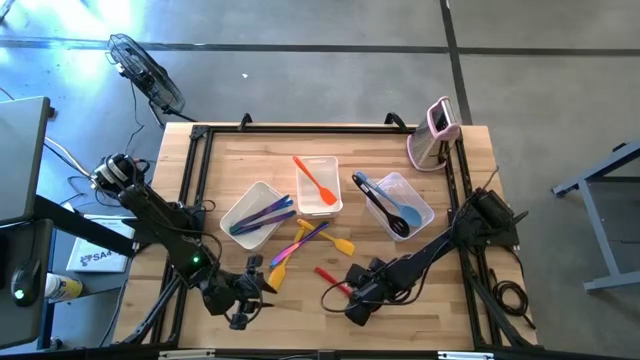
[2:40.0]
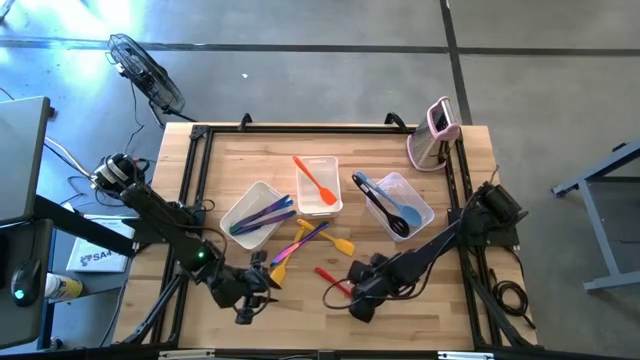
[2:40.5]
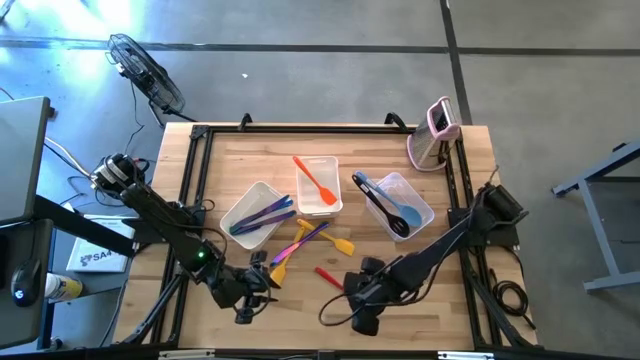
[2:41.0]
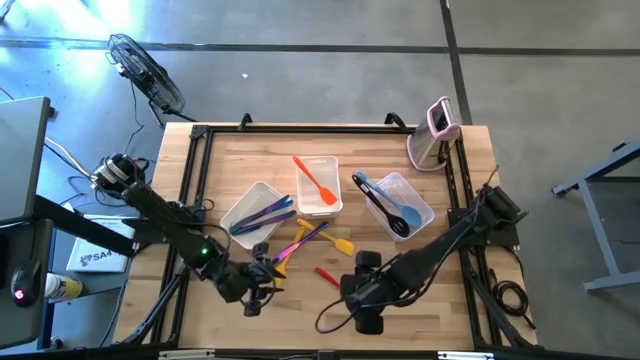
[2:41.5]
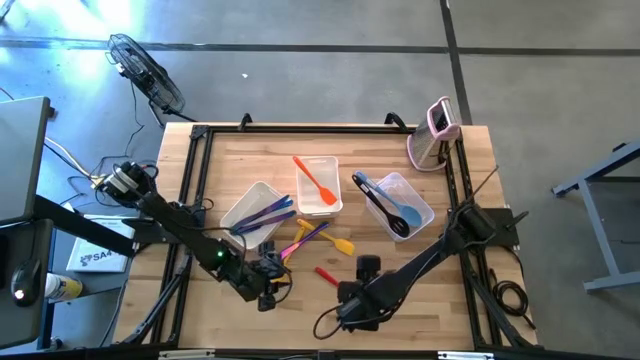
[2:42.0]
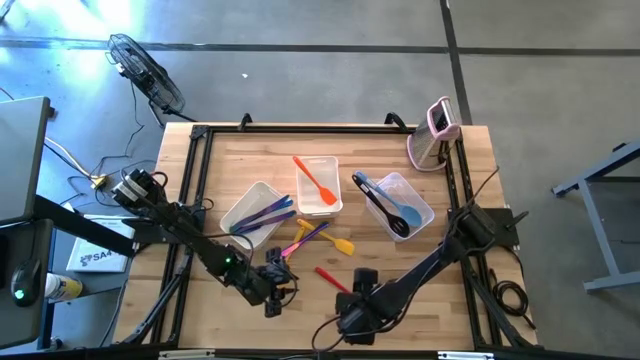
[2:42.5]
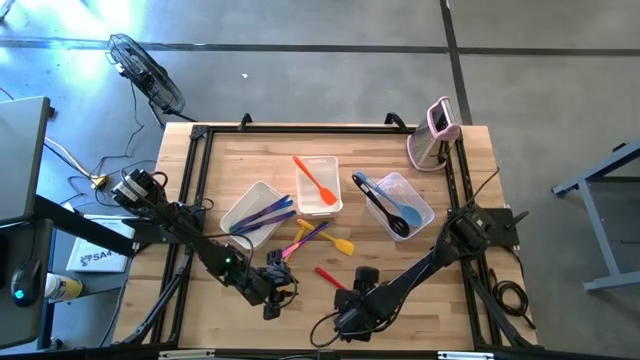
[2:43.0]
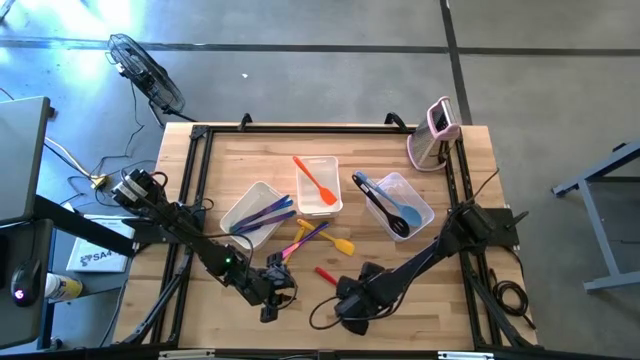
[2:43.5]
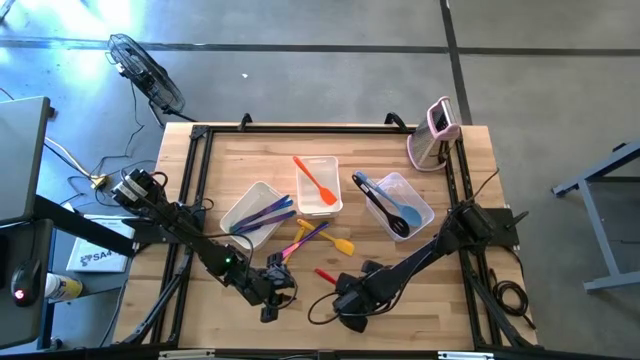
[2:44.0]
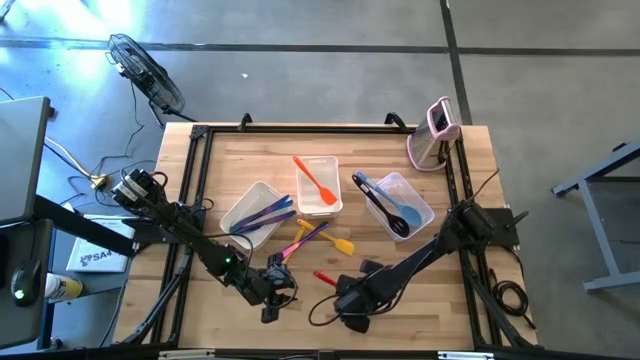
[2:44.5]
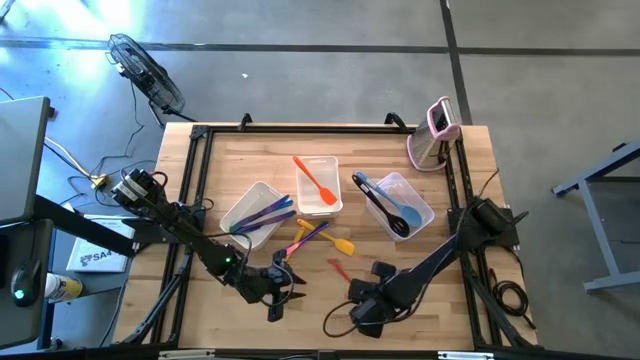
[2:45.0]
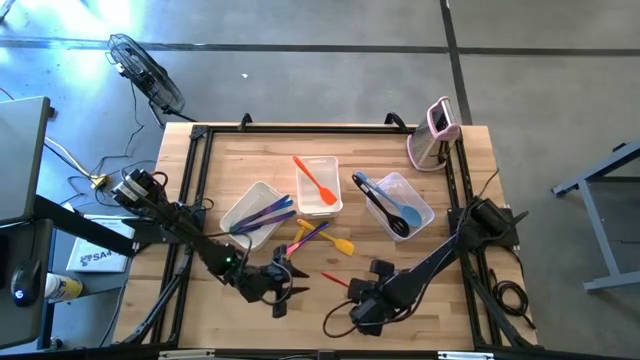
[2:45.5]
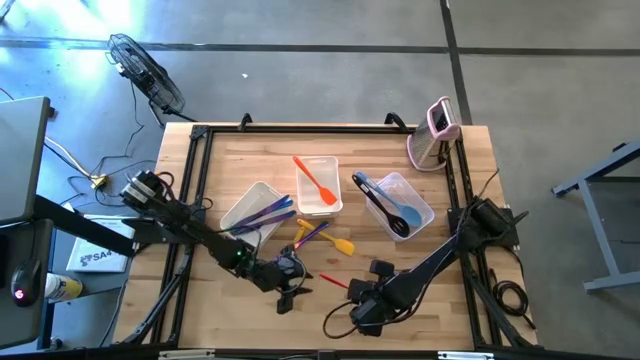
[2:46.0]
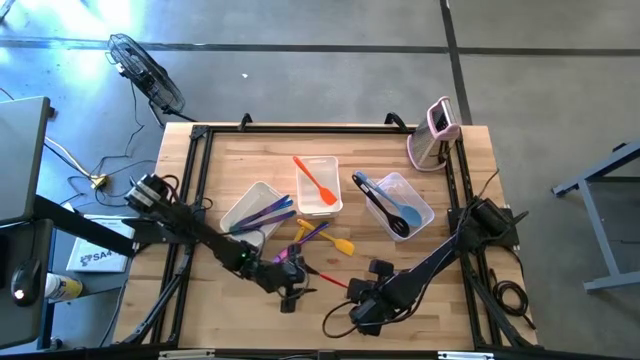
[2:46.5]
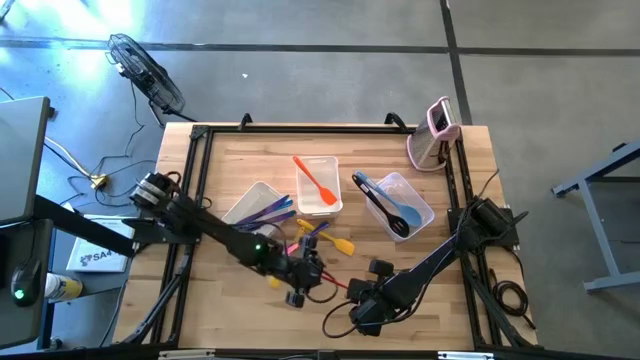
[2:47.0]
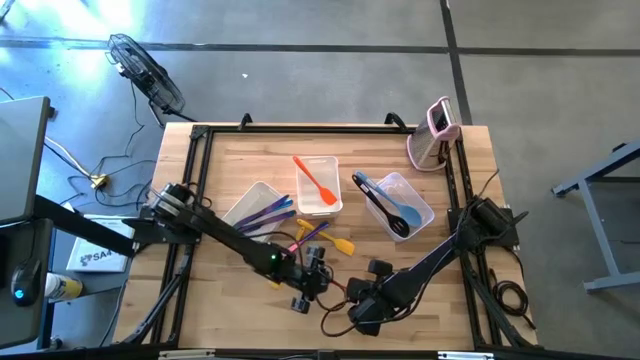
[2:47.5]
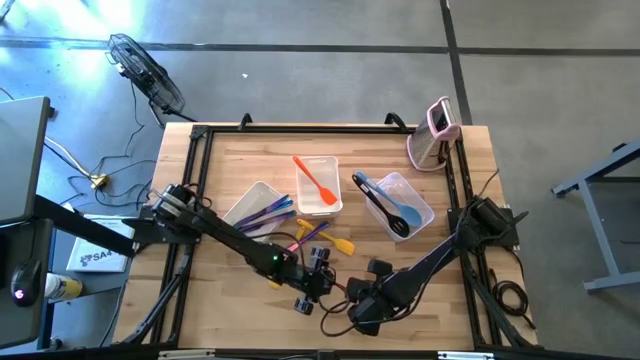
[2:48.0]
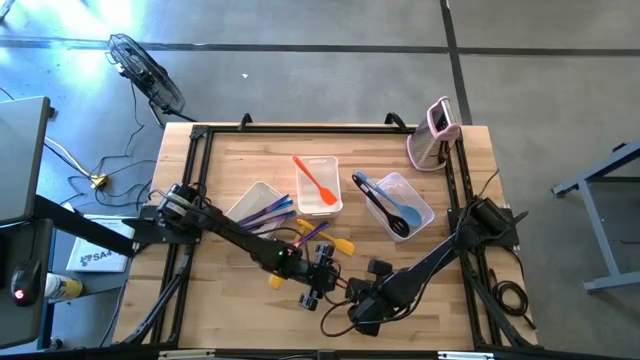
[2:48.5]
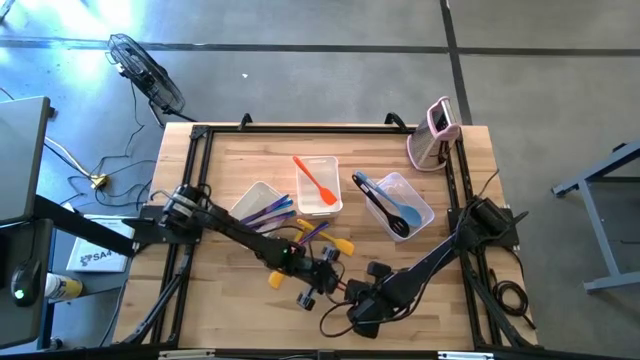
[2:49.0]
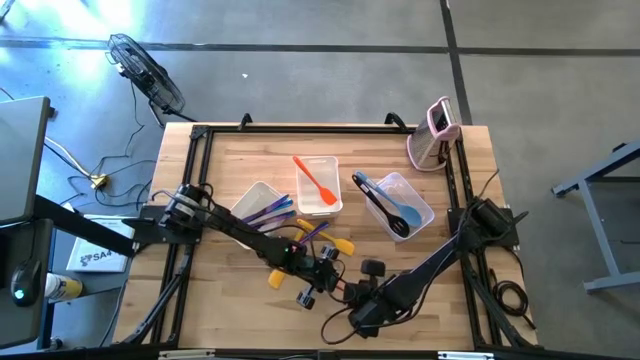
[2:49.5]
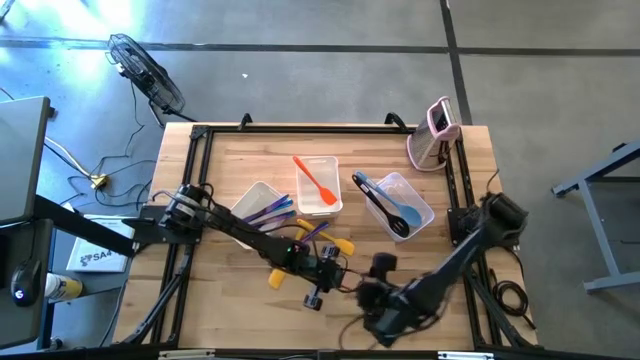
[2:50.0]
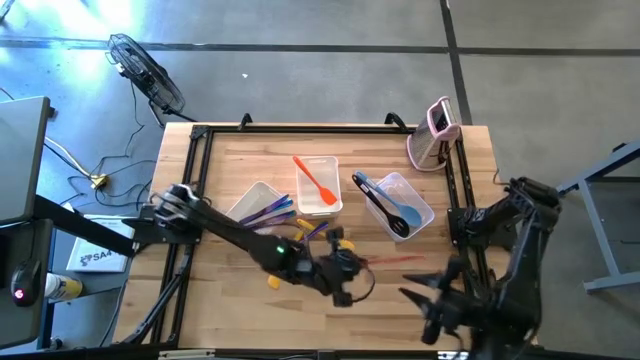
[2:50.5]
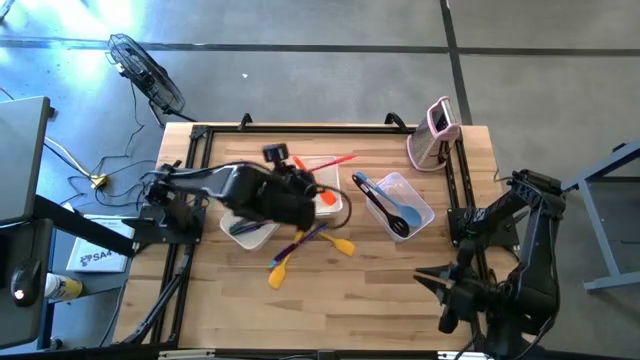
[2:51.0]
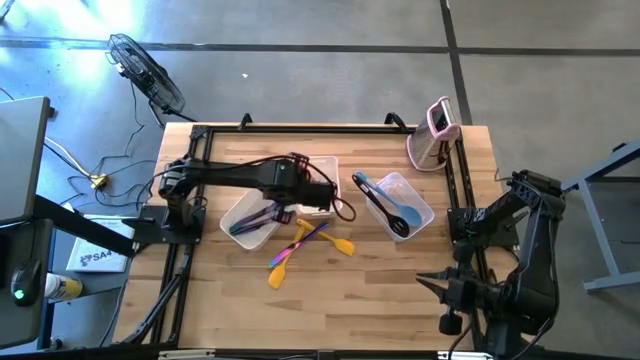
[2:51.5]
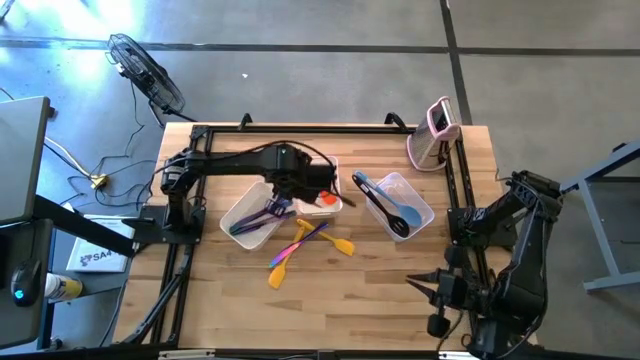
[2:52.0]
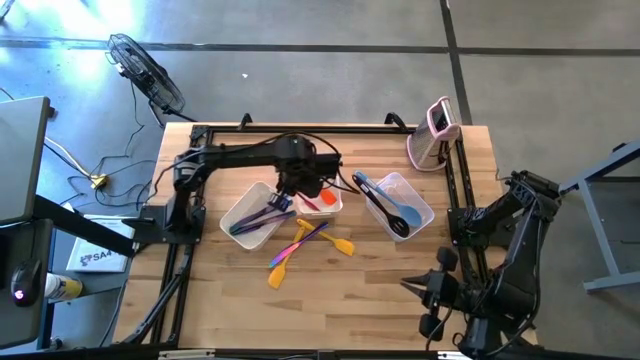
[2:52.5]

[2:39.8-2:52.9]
Task: Pick & Place Kitchen Items
Put the red spatula into the right white bin

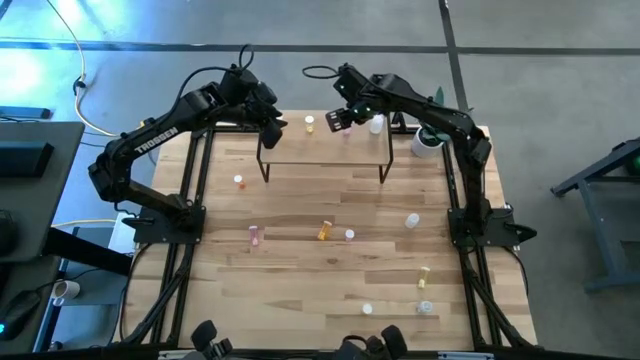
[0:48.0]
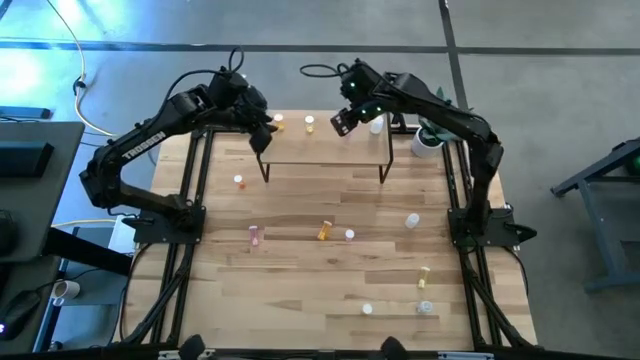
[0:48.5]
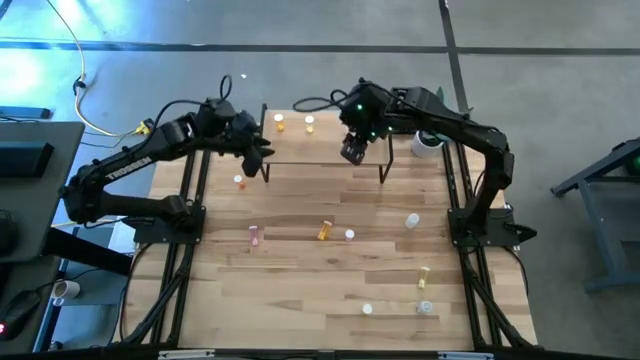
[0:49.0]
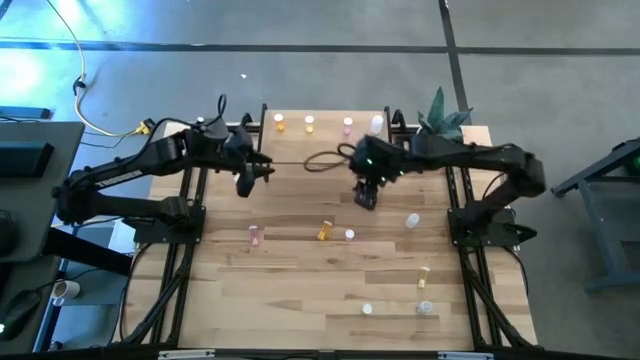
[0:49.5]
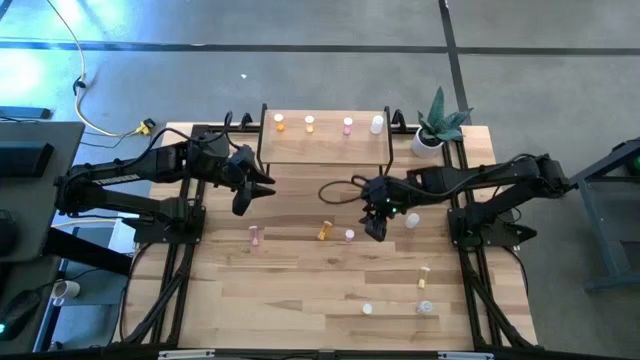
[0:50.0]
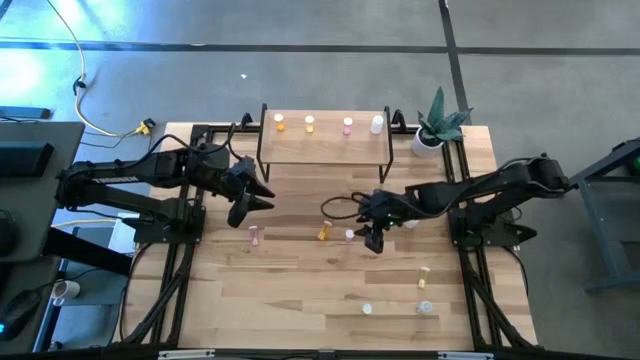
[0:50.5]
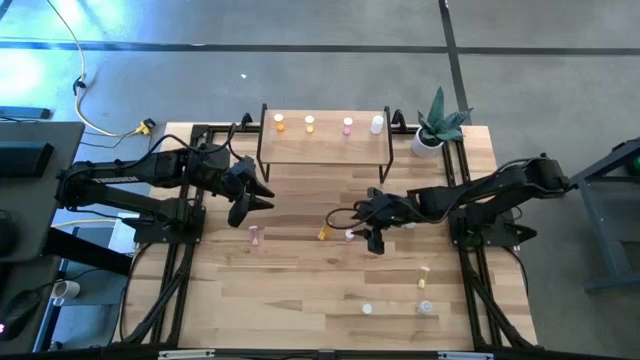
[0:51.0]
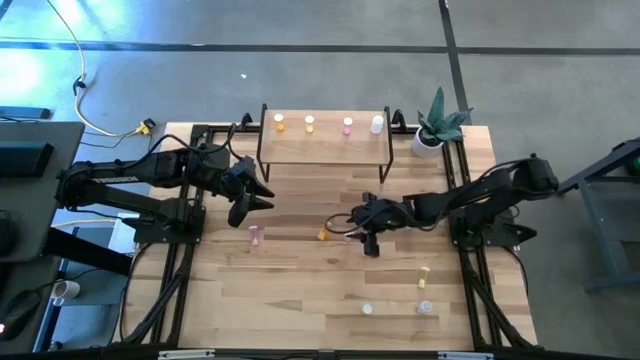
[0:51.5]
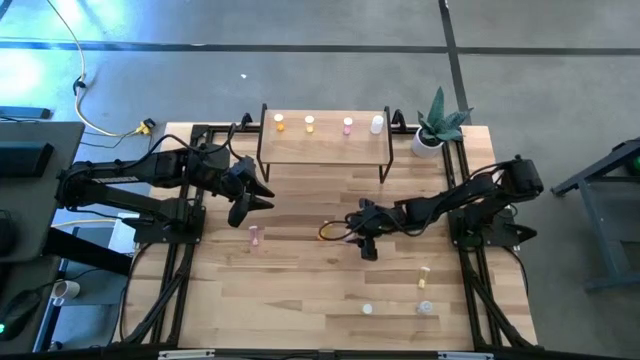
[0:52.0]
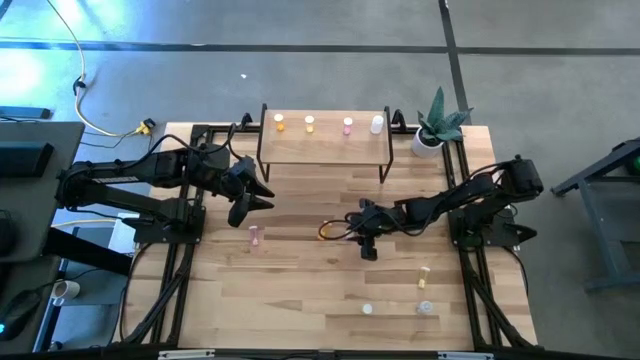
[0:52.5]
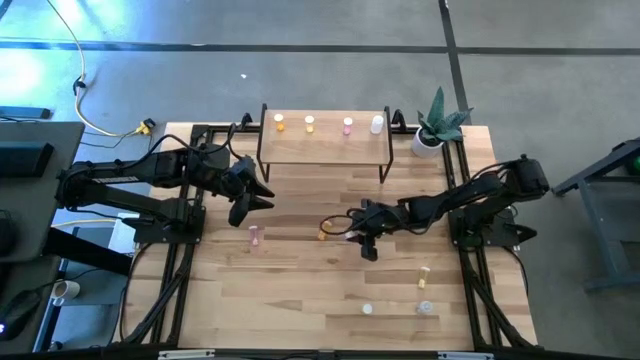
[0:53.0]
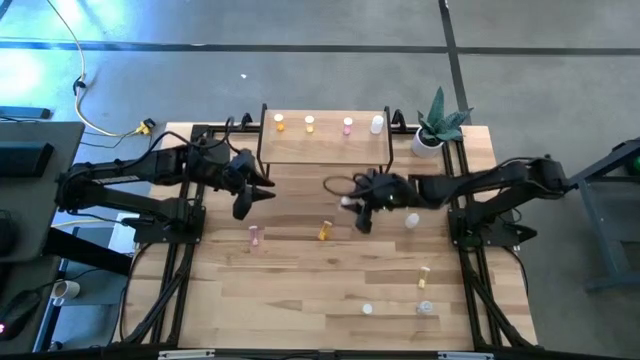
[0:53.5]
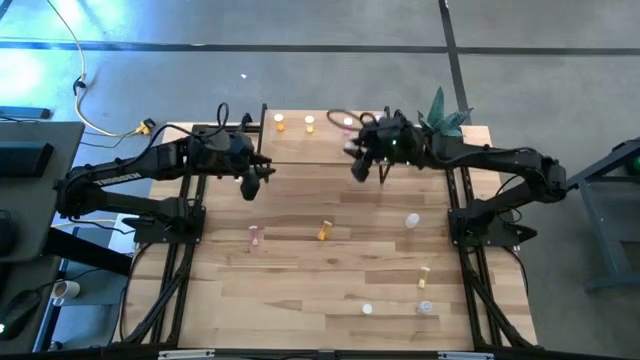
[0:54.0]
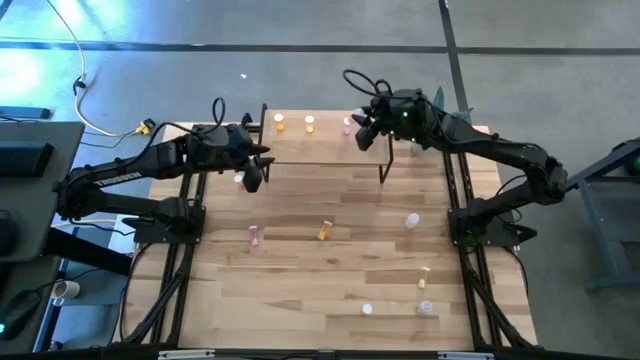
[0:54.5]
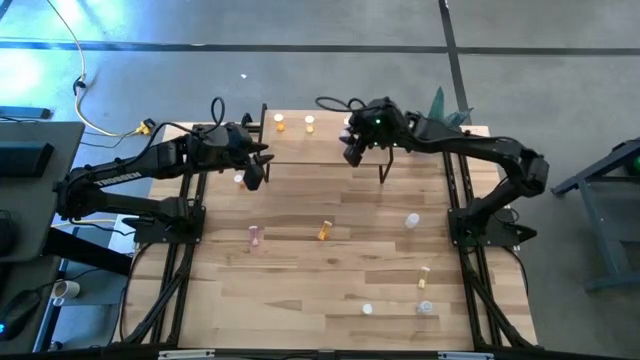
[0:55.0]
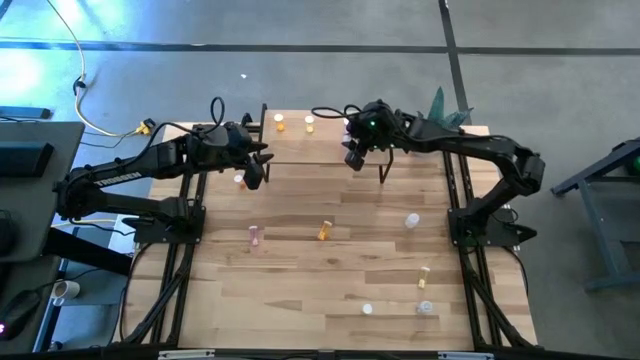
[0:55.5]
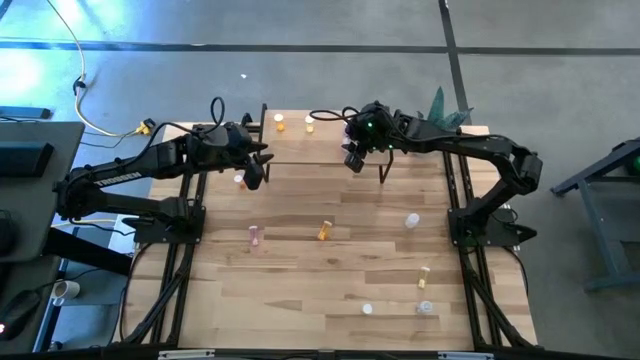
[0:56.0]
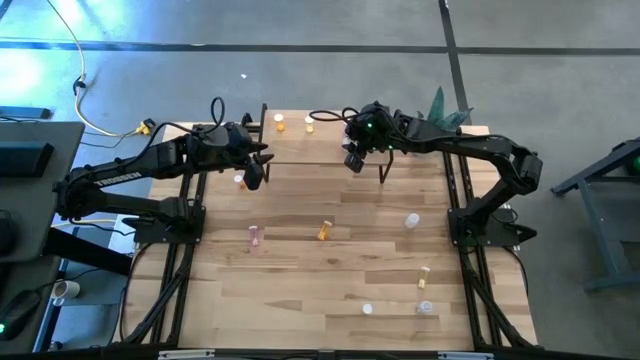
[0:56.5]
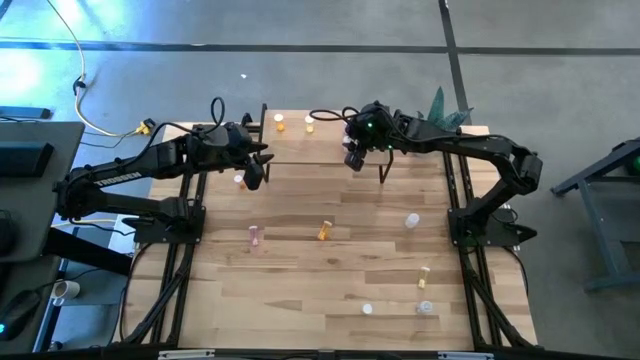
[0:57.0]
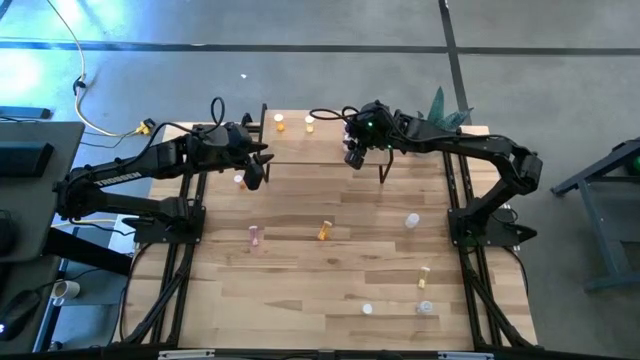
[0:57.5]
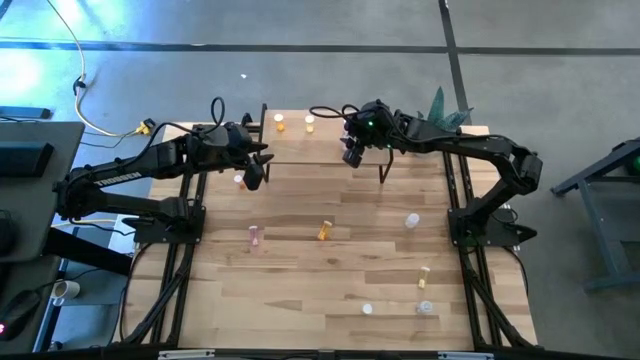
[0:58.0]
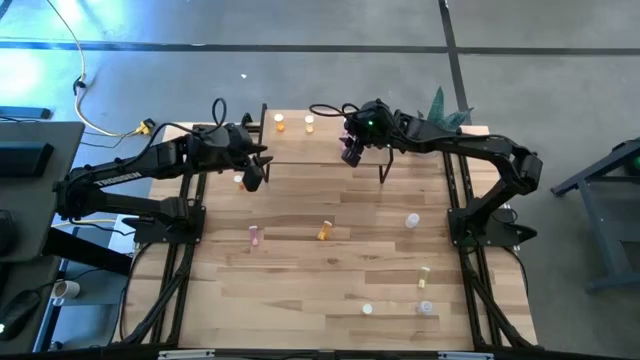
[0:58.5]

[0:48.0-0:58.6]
Task: Pick and place medicine bottles onto shelf by color
Put the right pink pill bottle on the shelf aligned with other pink pill bottle
